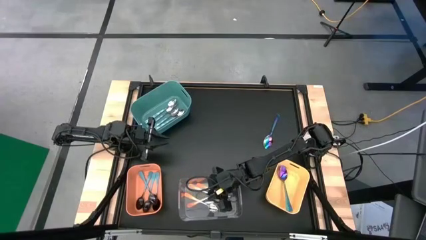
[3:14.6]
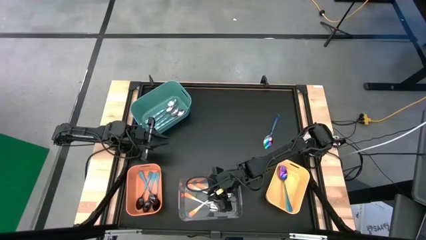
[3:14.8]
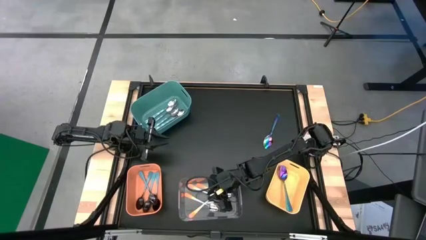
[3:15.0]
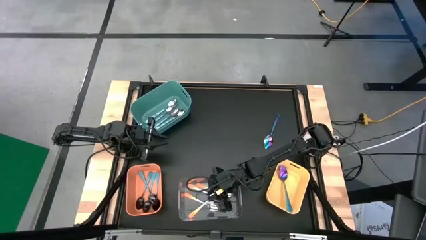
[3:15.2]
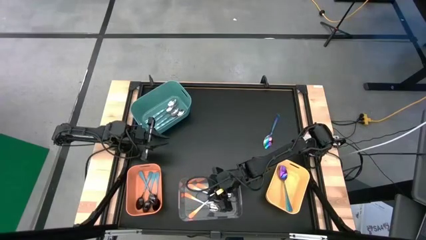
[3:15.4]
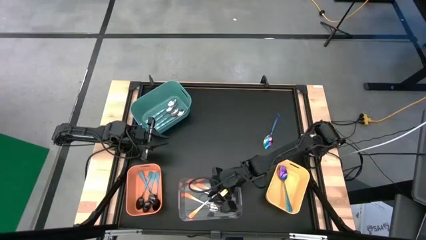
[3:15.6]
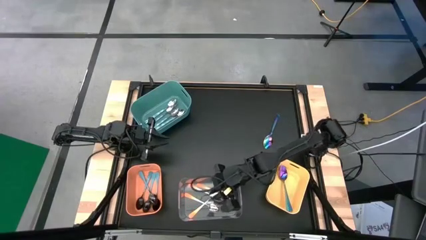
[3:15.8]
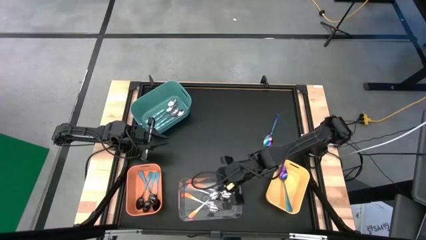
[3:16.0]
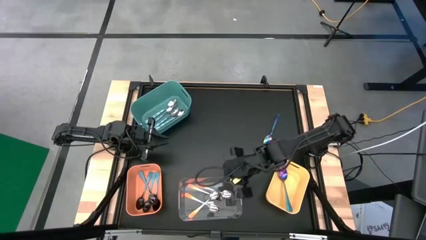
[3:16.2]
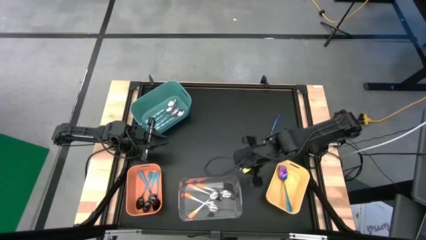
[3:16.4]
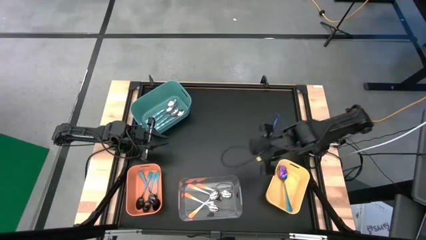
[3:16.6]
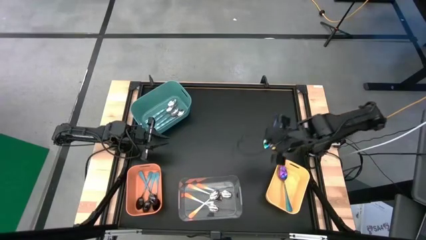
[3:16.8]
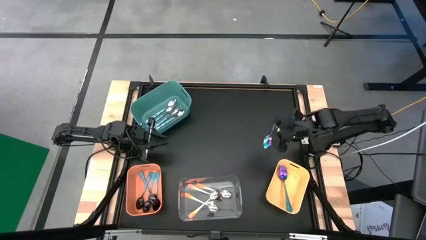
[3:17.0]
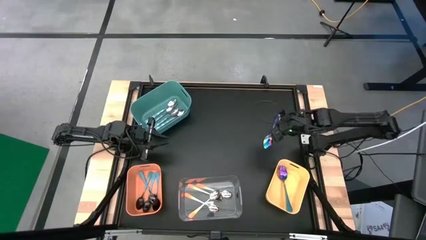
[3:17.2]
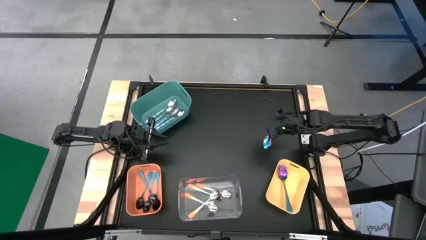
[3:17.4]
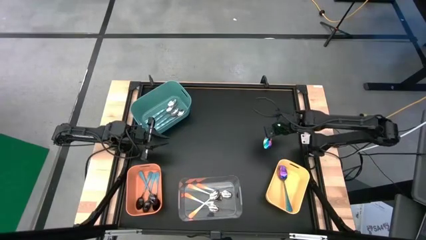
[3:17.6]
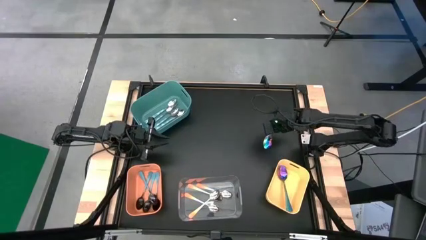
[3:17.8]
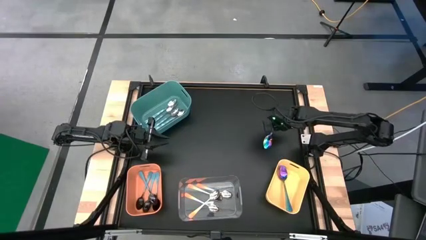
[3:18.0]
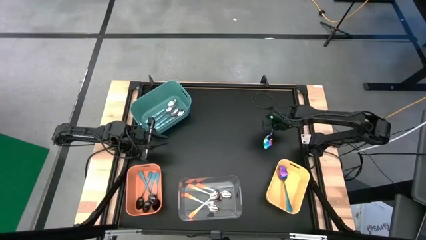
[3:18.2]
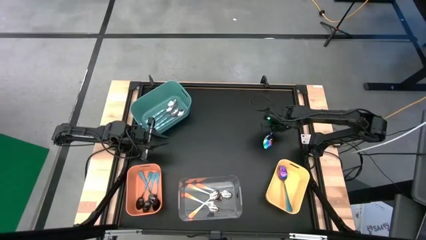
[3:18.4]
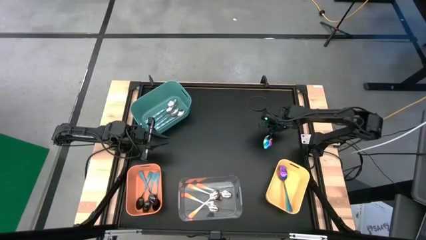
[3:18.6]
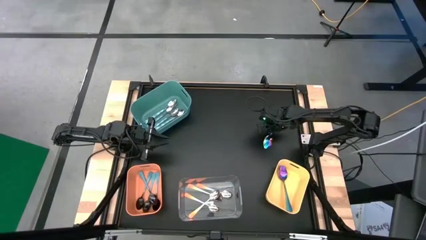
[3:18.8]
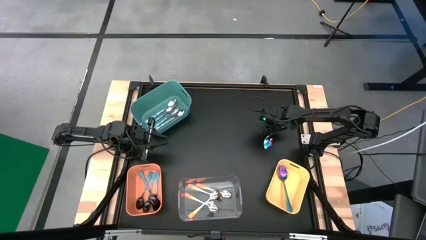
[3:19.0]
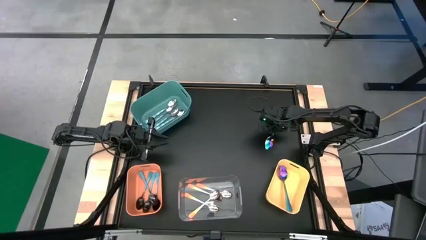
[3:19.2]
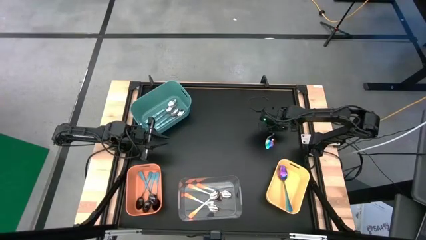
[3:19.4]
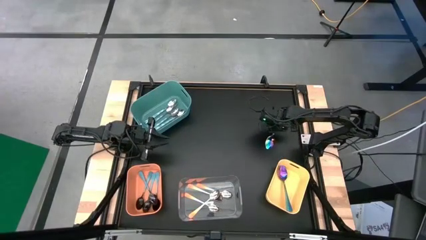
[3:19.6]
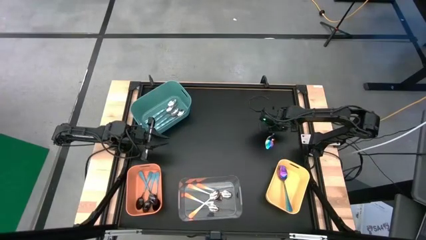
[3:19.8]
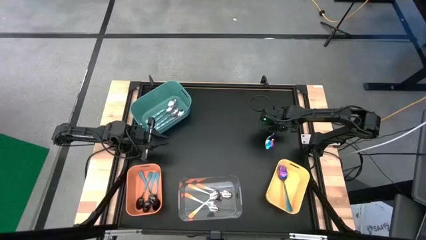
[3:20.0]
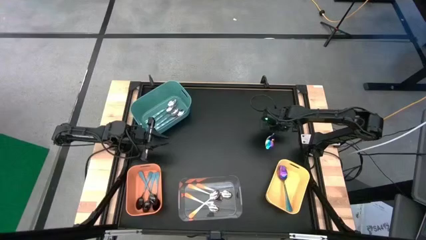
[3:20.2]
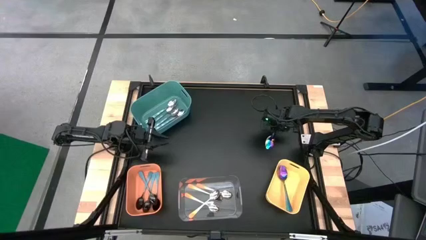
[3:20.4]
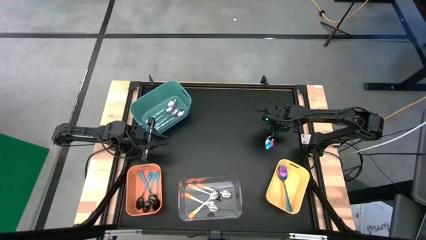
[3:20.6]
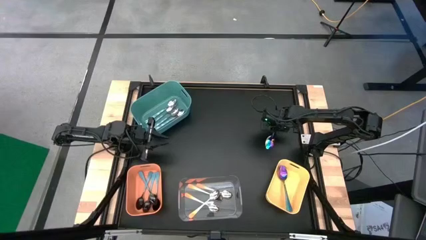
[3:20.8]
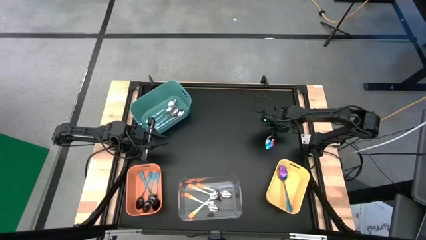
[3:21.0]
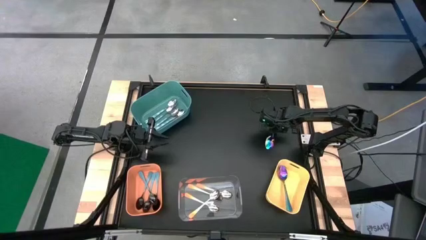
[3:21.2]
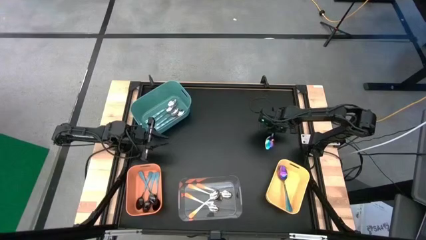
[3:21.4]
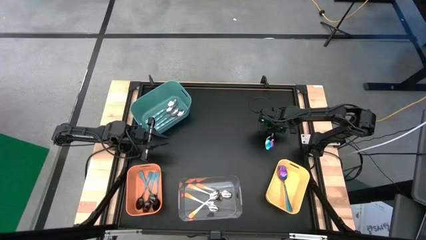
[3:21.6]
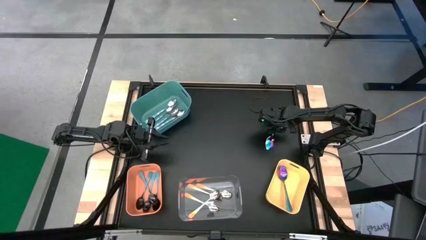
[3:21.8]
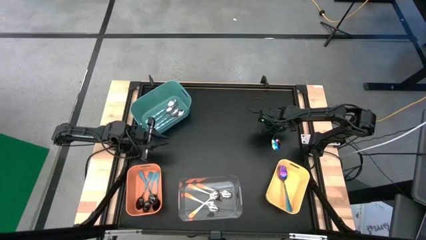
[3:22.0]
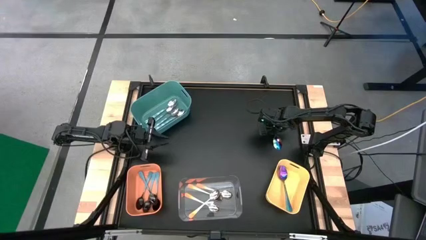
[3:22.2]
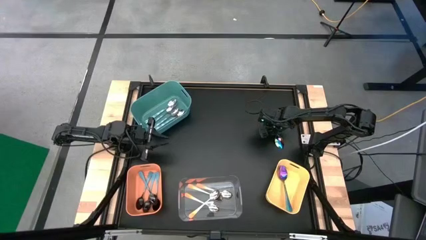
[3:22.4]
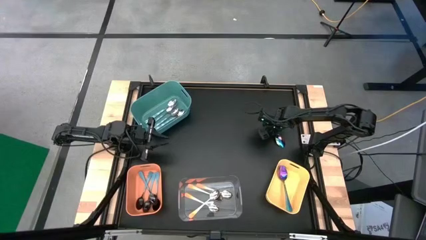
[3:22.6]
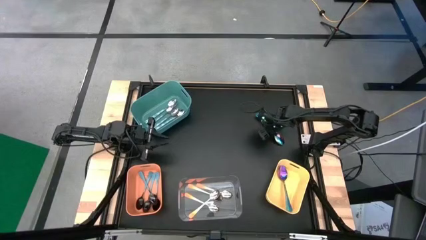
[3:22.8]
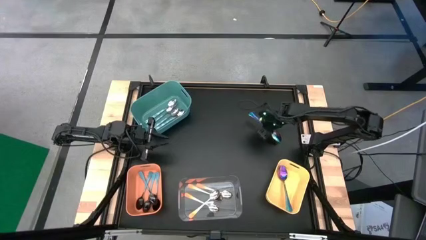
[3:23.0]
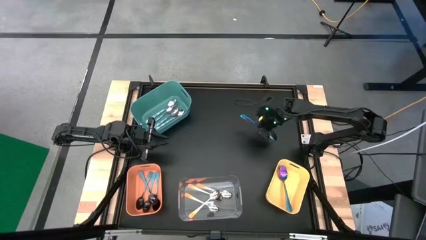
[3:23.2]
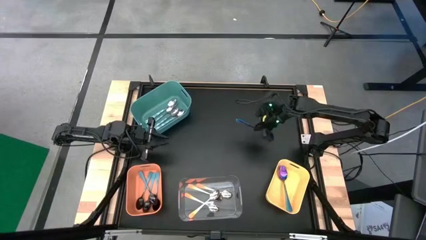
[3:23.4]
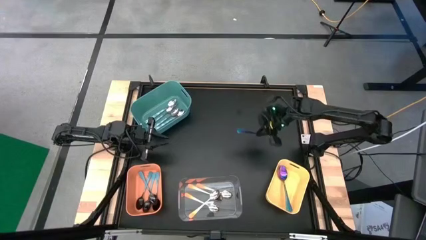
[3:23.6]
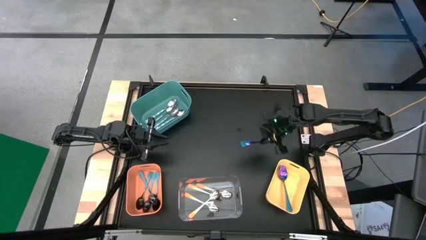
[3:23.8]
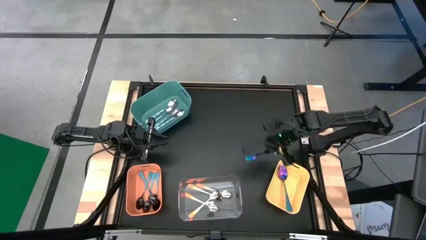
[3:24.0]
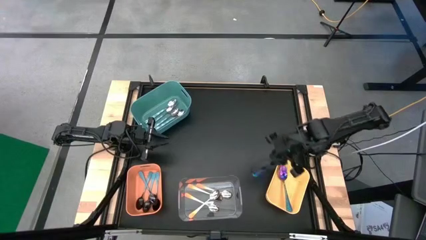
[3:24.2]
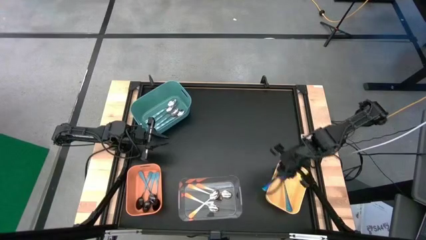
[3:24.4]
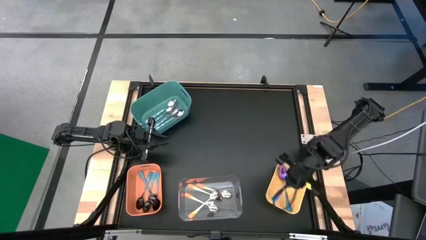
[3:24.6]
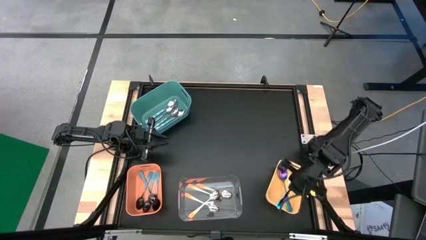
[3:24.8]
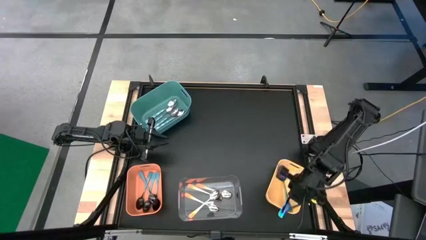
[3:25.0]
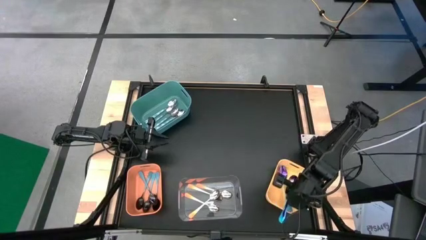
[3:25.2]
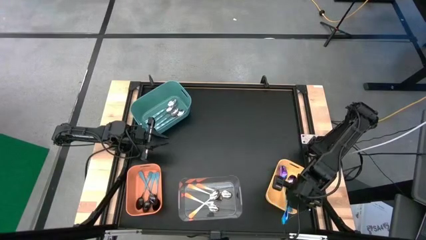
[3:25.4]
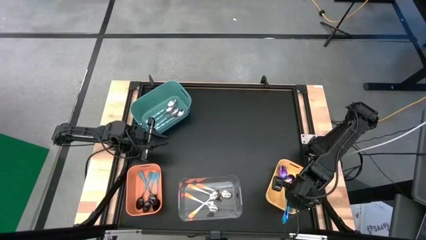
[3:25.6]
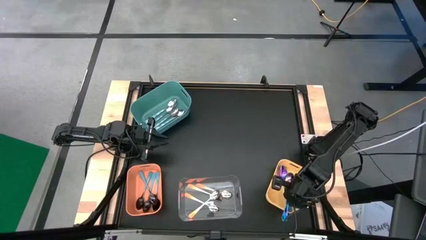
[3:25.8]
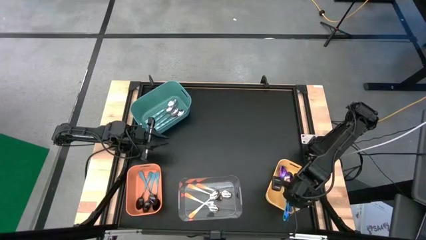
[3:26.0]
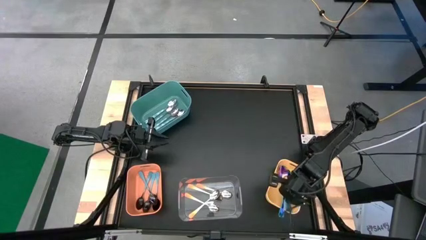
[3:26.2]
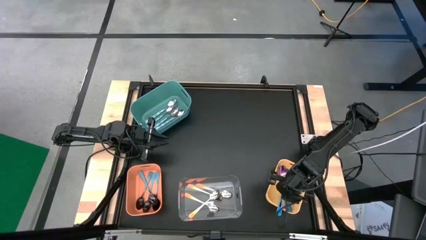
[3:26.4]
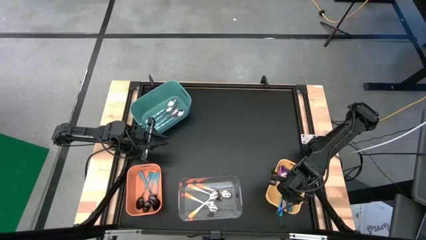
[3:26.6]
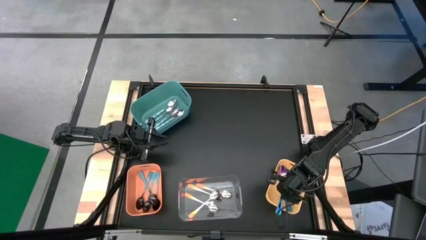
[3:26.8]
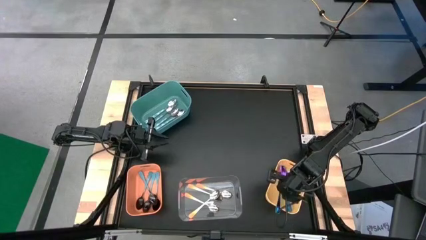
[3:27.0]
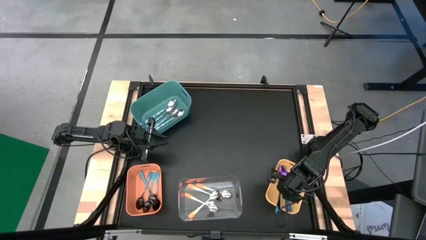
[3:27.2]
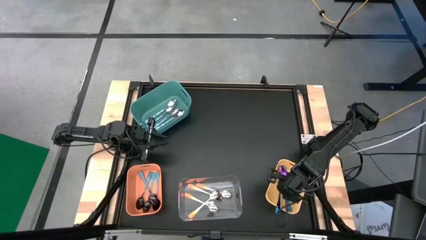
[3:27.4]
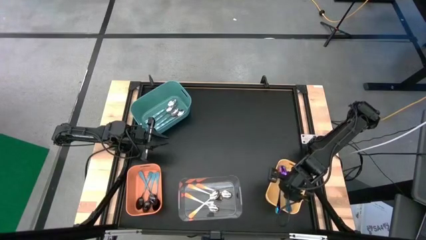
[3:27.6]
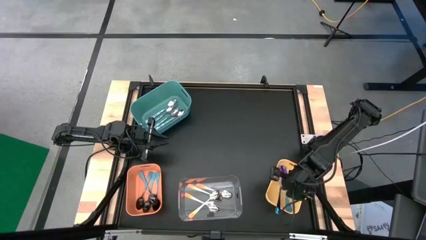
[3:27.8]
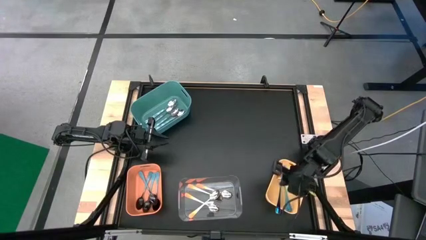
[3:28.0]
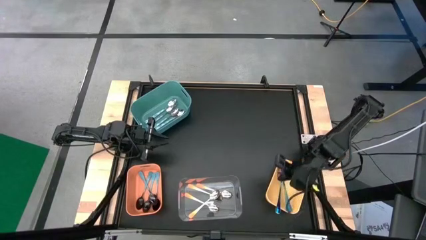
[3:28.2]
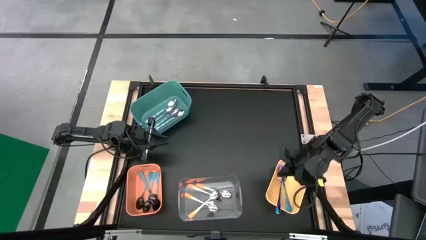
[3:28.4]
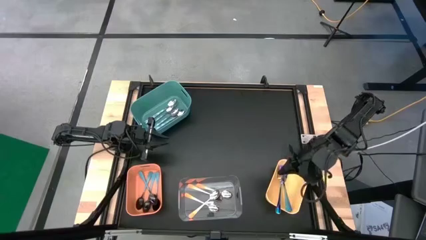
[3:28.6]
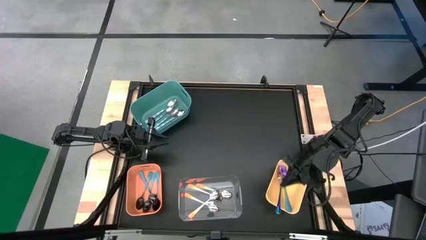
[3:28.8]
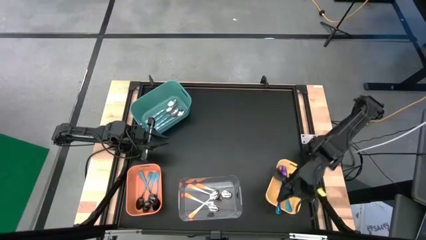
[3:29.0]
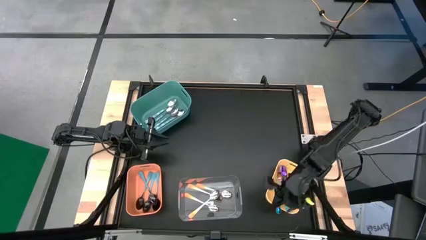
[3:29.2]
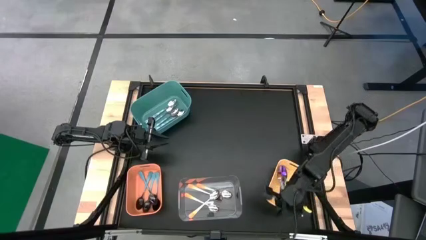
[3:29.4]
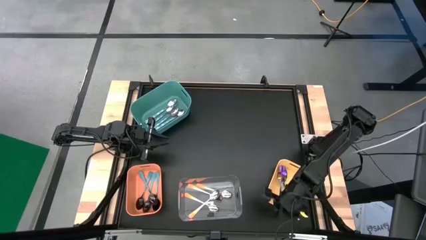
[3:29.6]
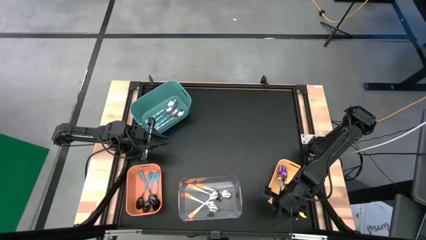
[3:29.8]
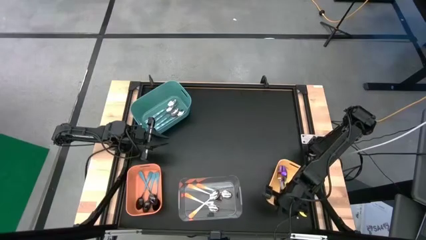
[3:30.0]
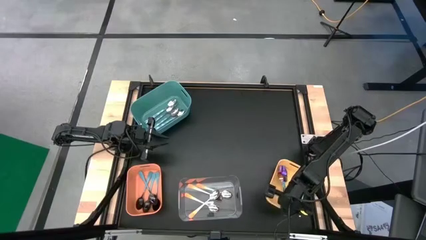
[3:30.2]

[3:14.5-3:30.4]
Task: Sort silverware by color (type)
Put the purple spoon into the yellow bin
